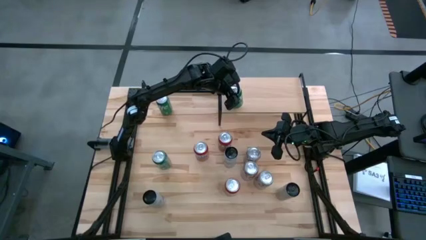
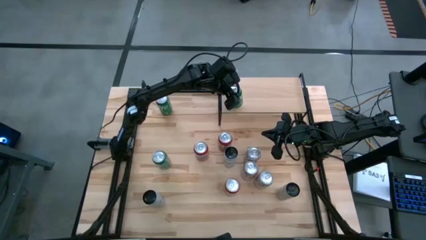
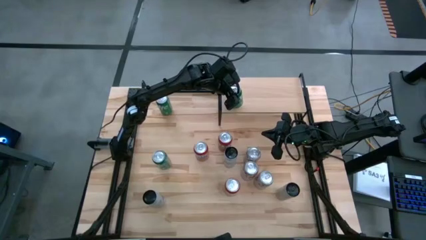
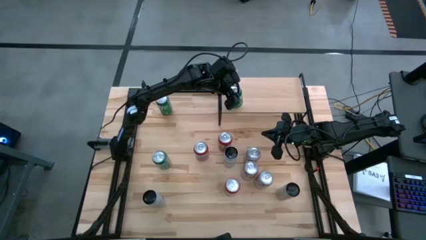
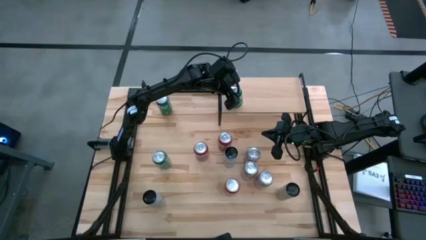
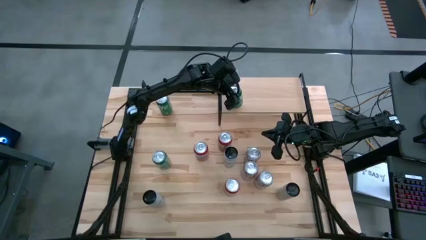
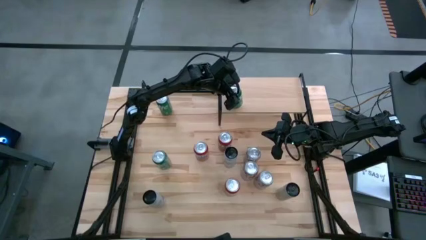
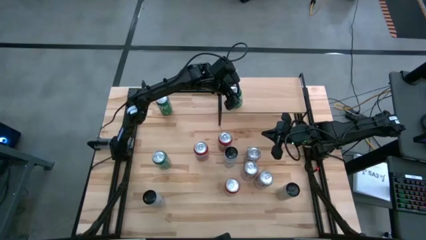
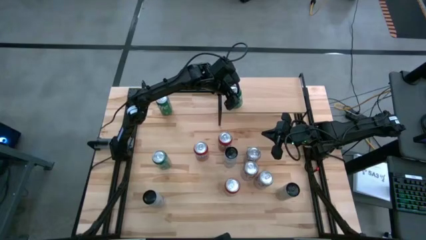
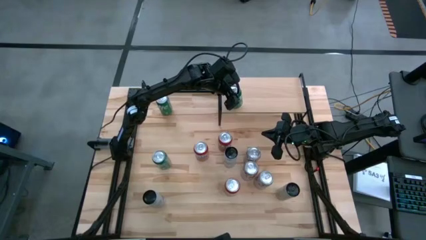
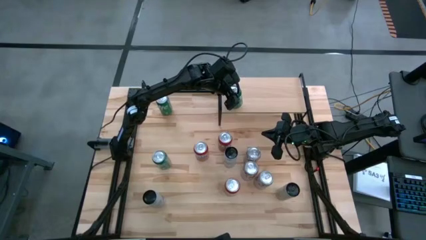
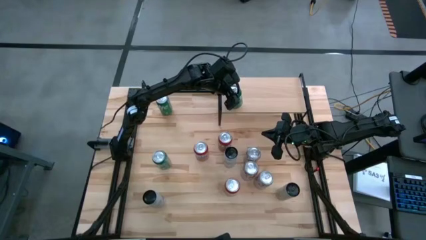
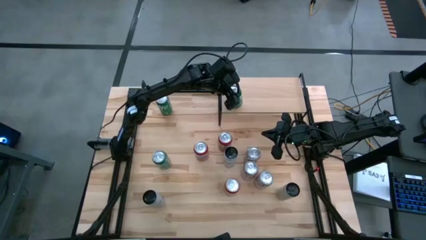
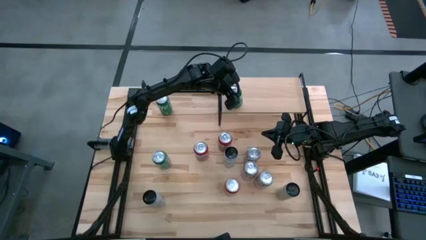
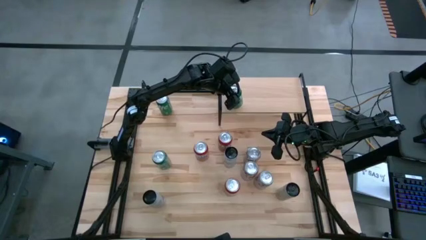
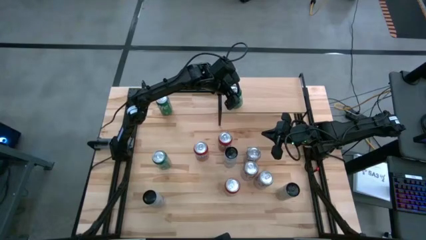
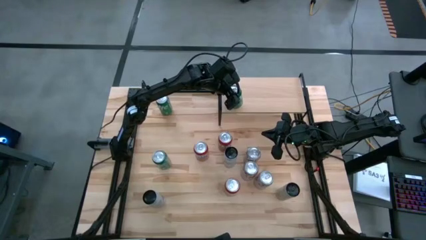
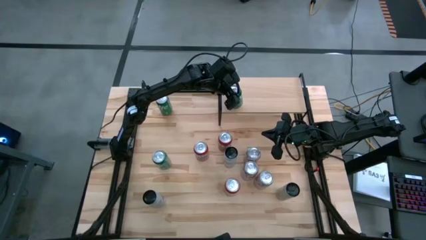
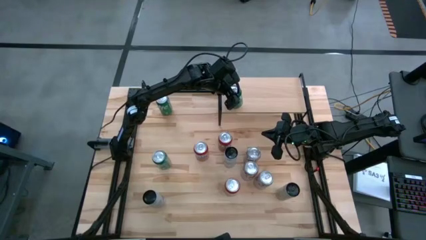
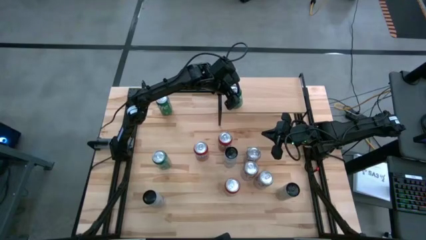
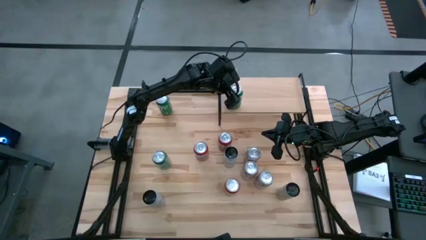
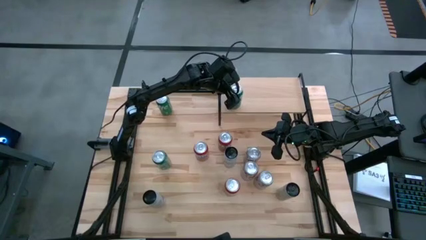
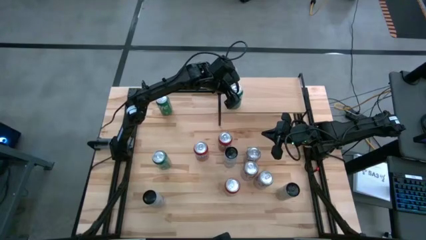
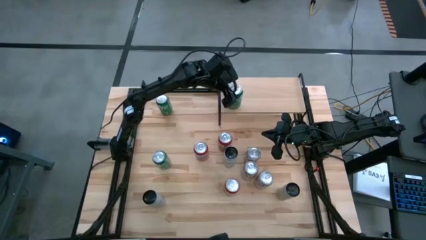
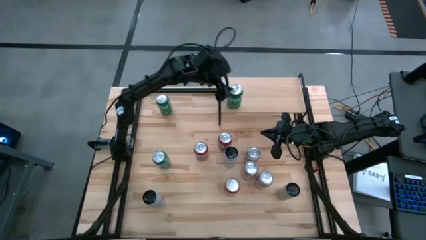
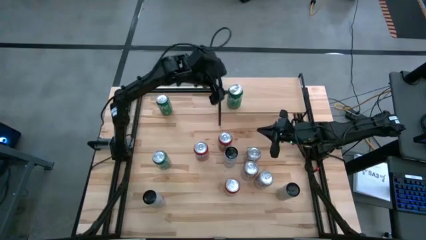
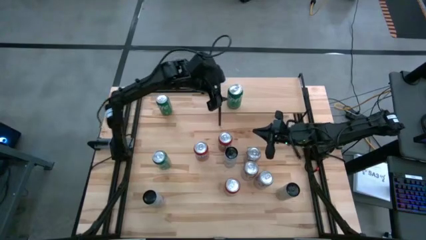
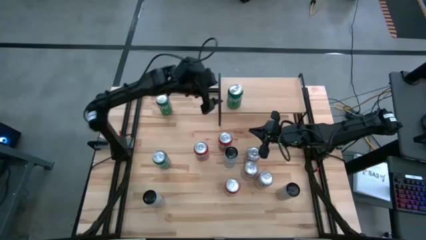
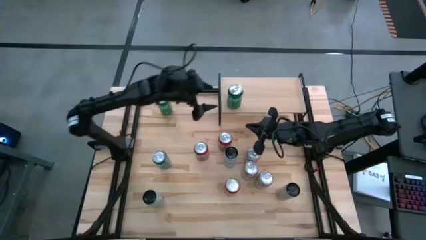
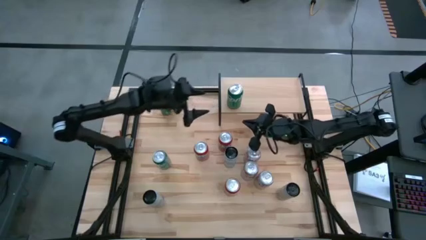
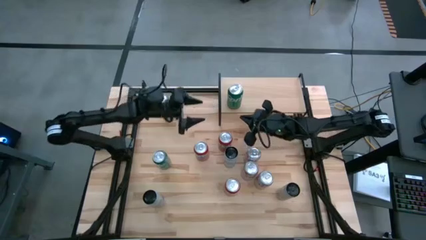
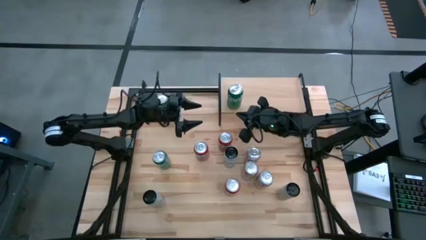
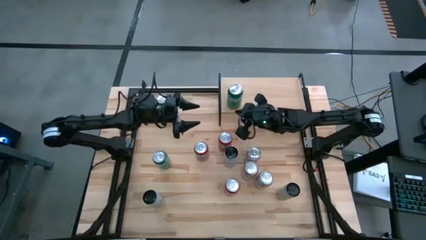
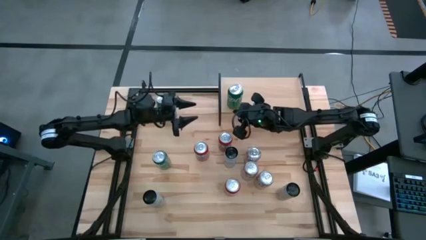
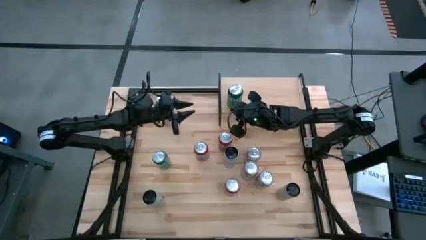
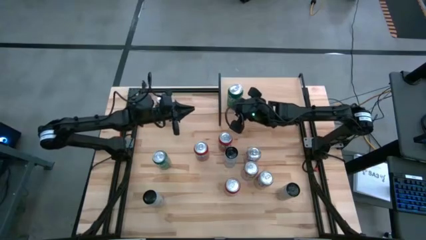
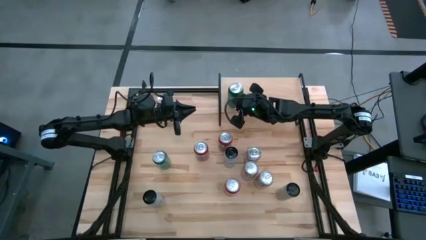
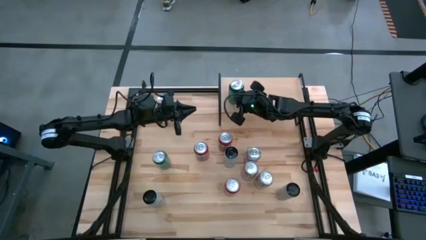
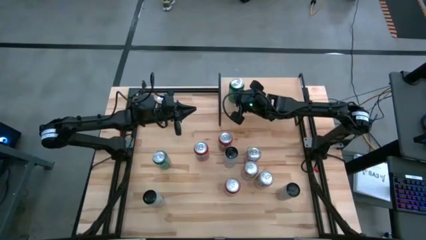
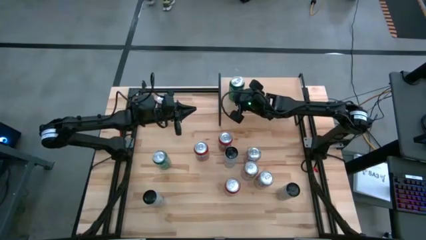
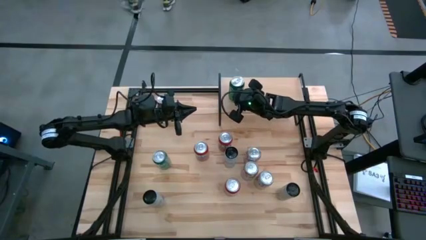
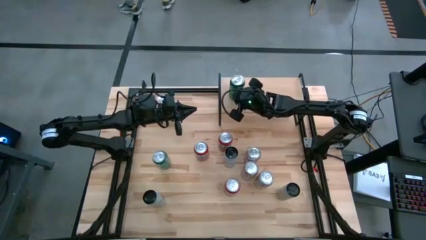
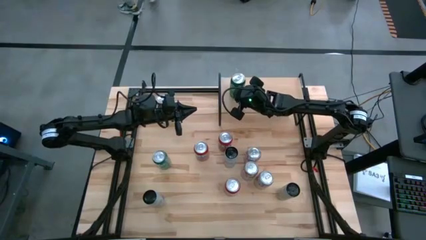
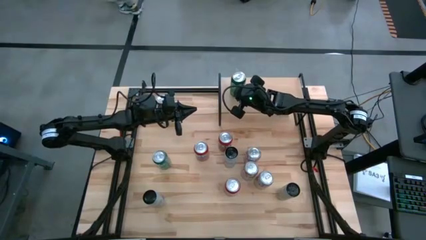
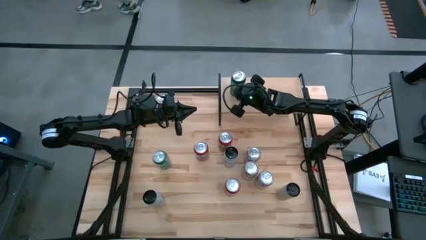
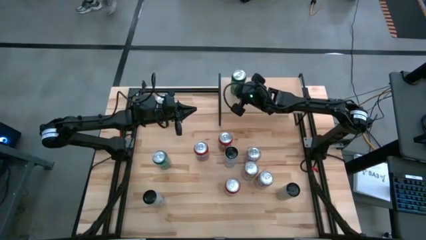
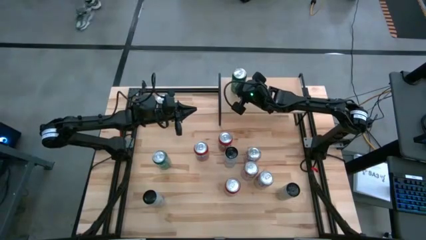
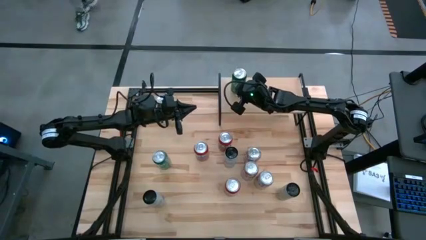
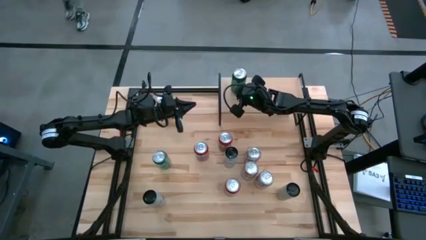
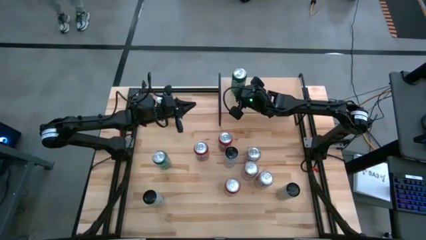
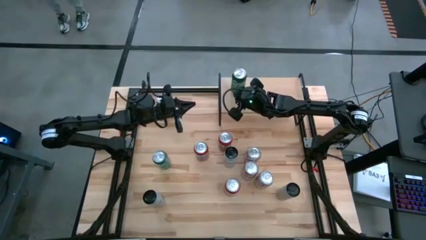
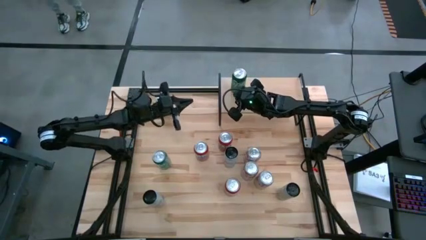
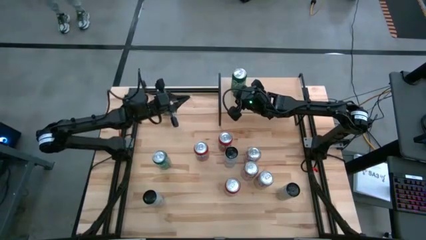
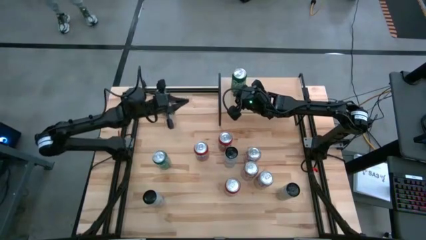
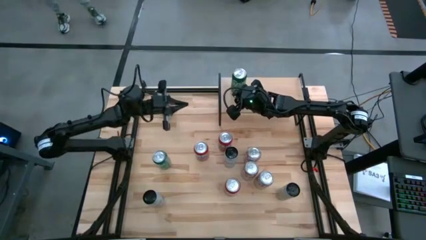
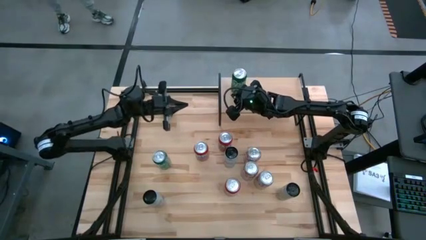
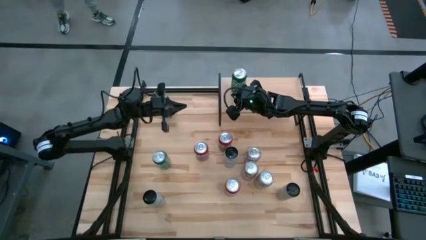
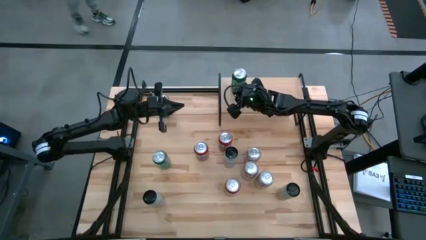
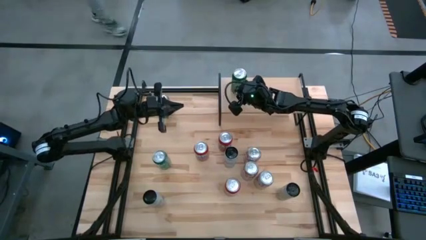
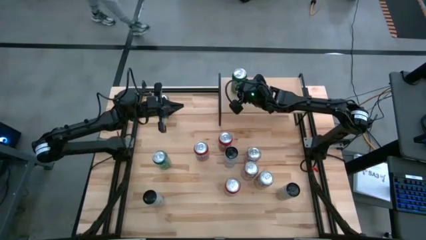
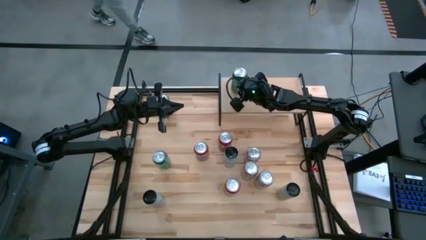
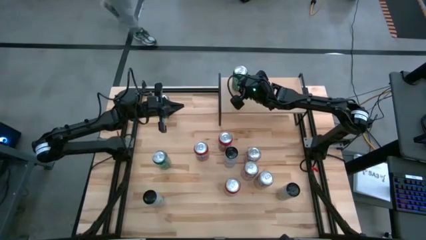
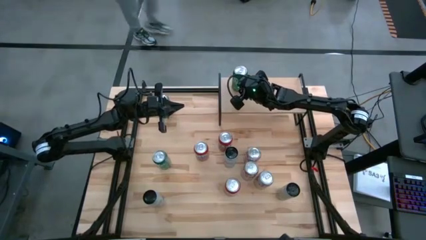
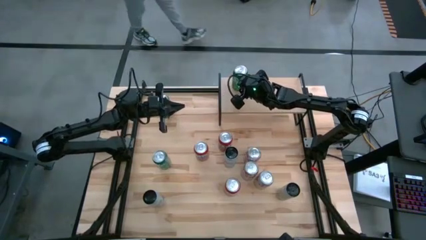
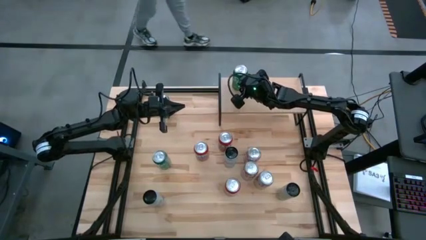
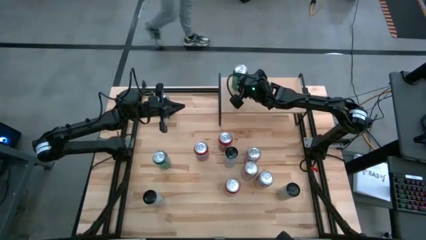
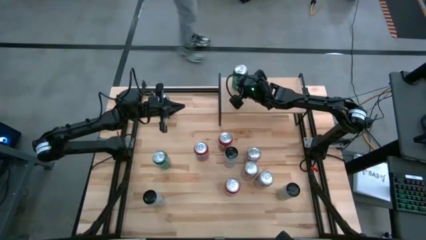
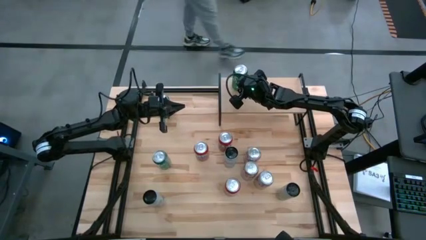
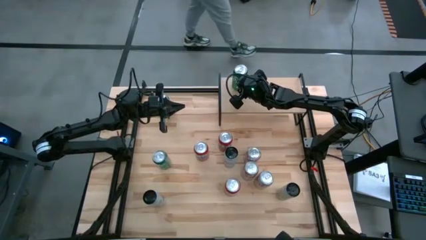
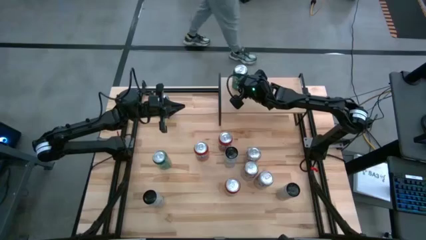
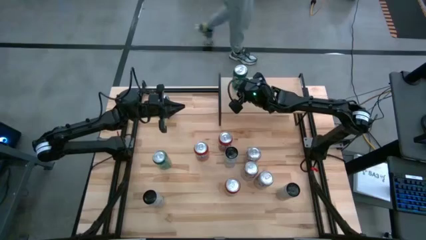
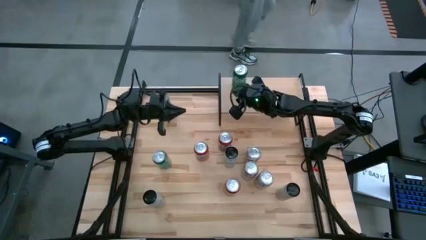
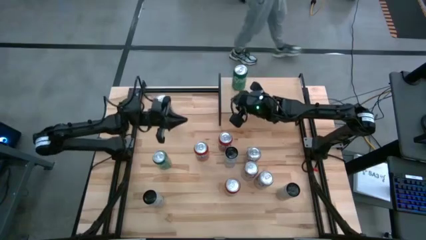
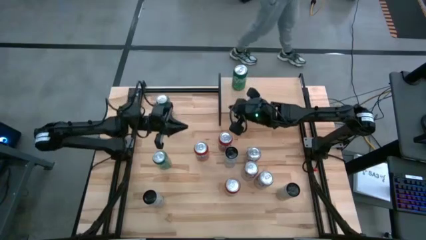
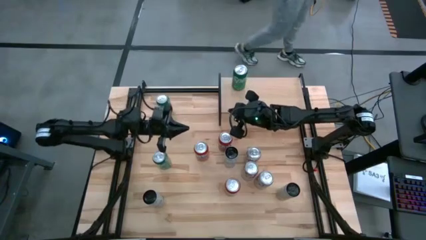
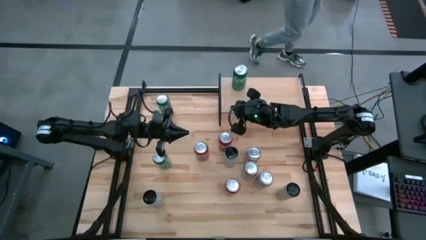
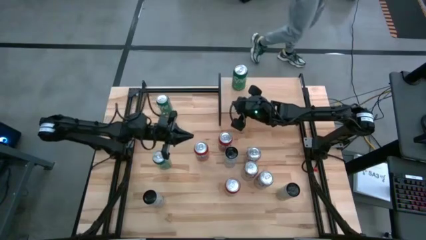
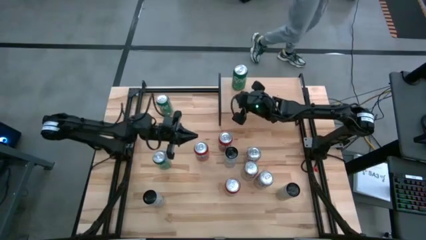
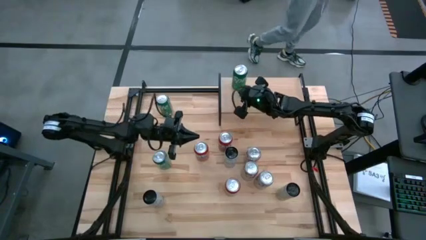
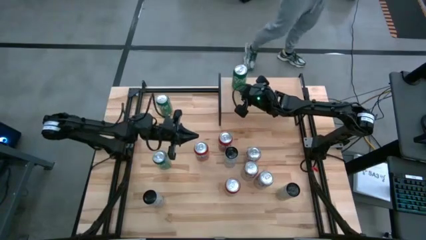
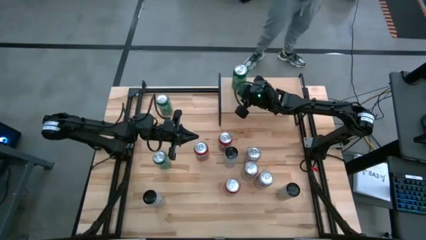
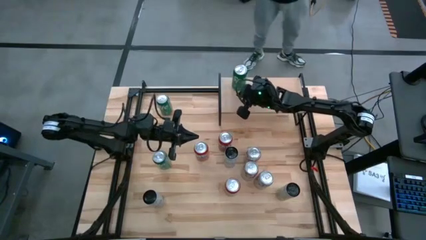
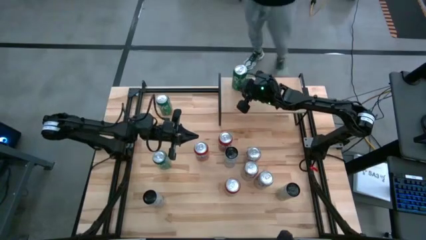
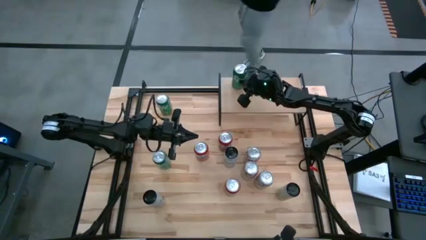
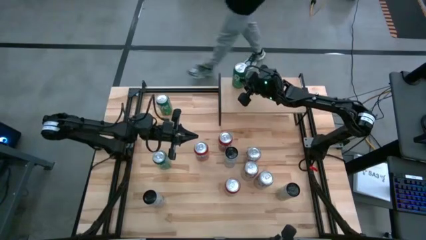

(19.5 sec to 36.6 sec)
Task: Place canned beverage on shelf
Put the bottom green soda can on the shelf
